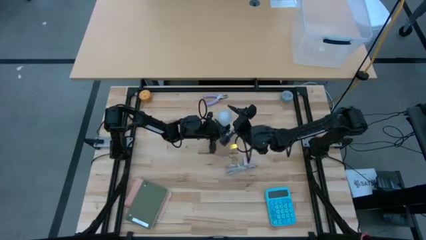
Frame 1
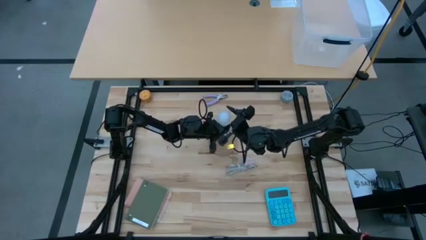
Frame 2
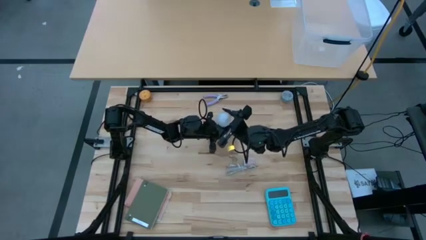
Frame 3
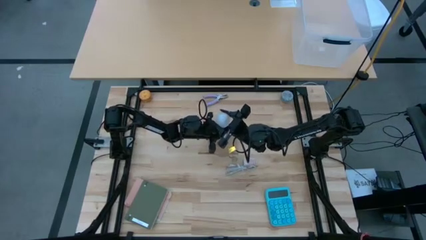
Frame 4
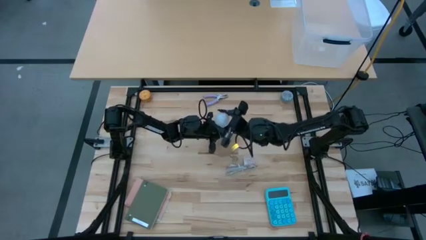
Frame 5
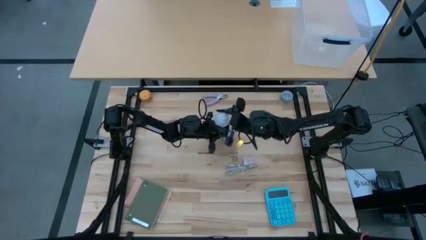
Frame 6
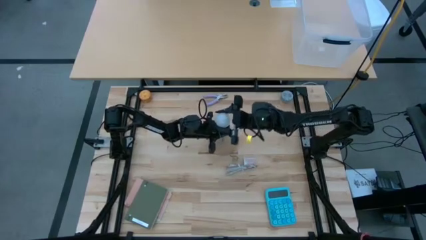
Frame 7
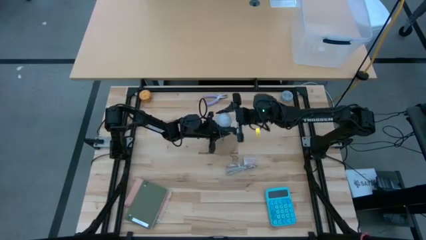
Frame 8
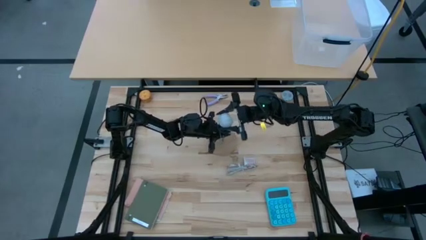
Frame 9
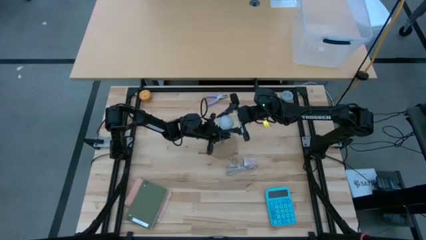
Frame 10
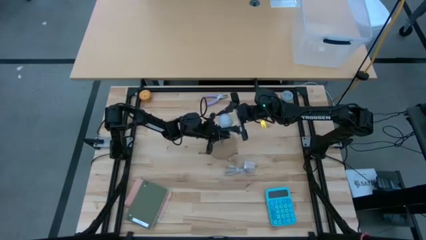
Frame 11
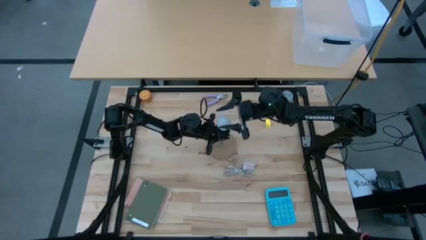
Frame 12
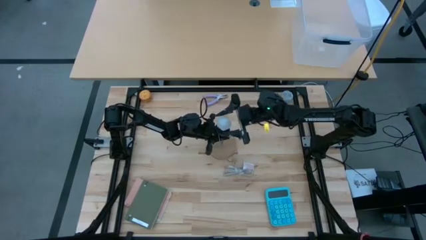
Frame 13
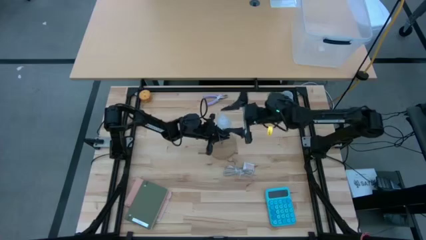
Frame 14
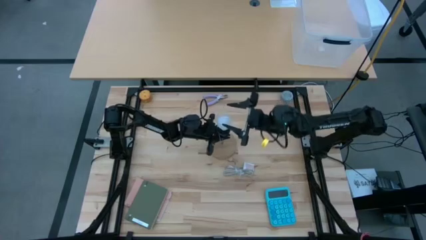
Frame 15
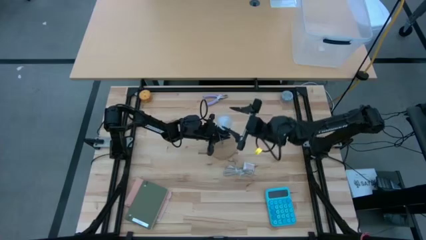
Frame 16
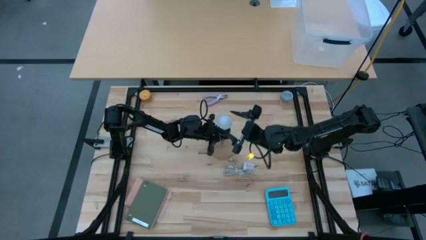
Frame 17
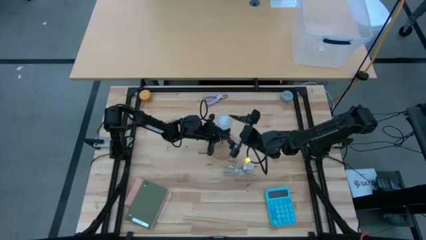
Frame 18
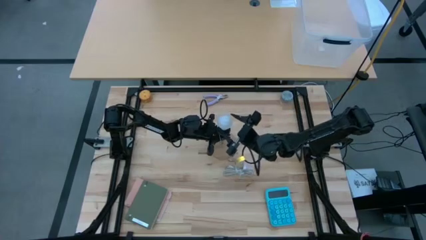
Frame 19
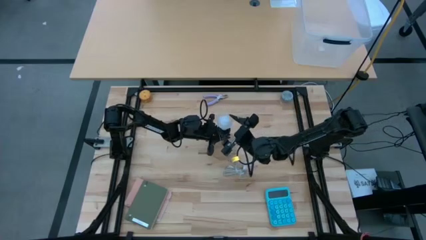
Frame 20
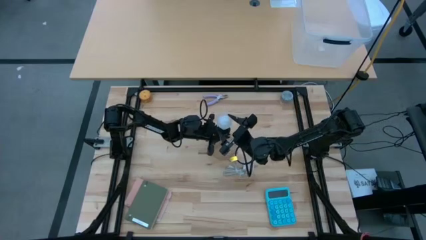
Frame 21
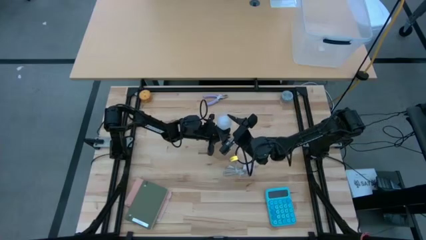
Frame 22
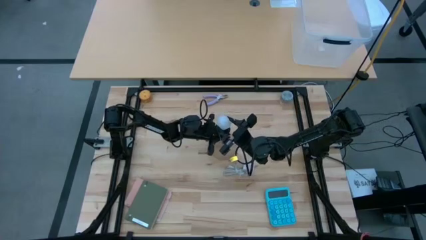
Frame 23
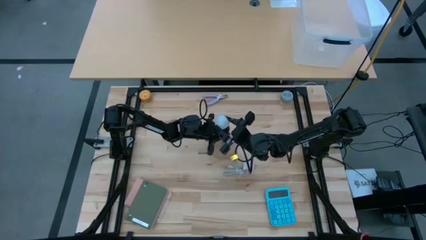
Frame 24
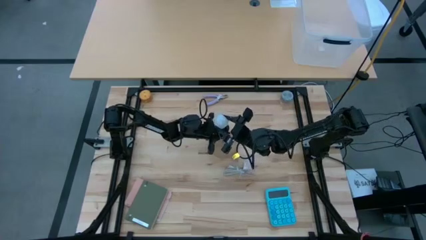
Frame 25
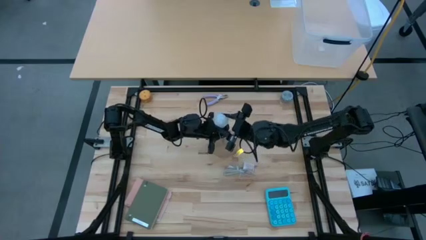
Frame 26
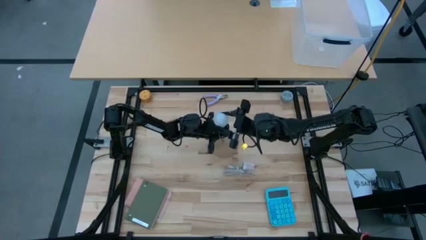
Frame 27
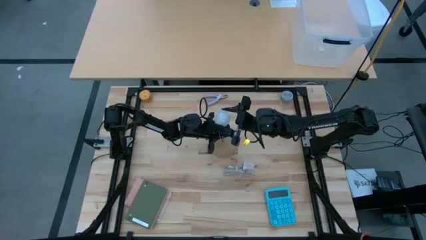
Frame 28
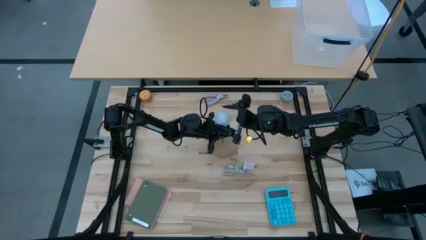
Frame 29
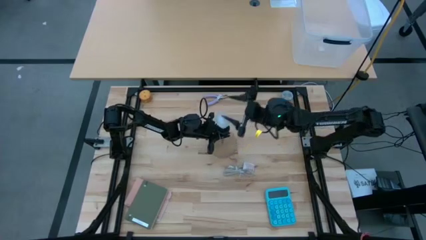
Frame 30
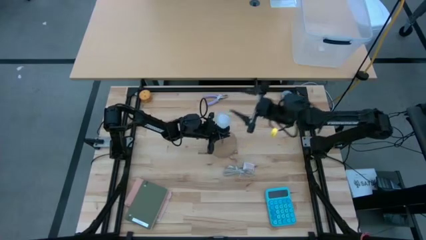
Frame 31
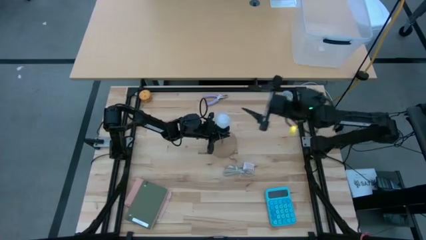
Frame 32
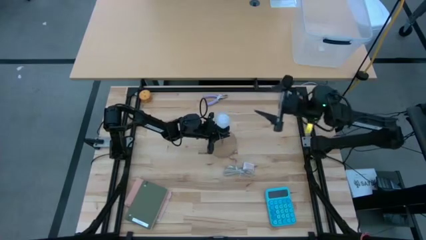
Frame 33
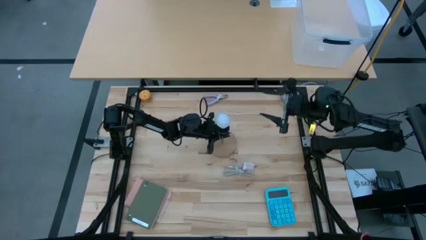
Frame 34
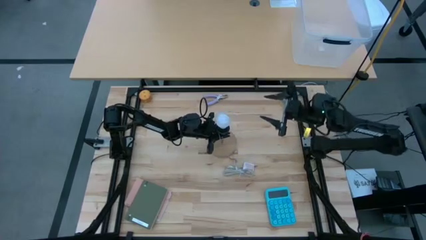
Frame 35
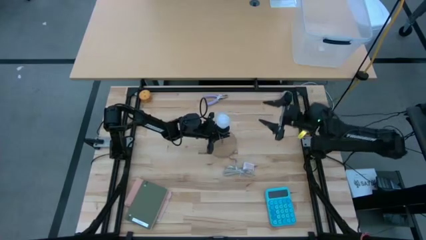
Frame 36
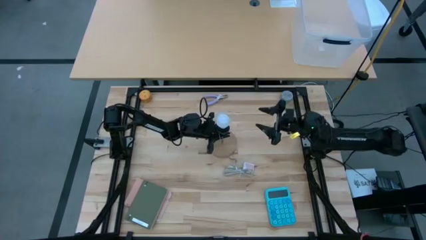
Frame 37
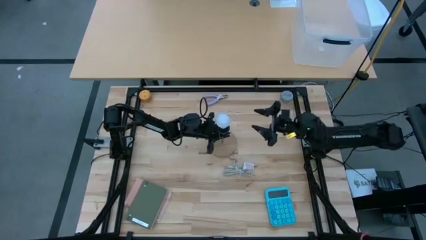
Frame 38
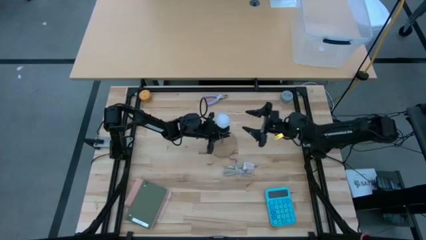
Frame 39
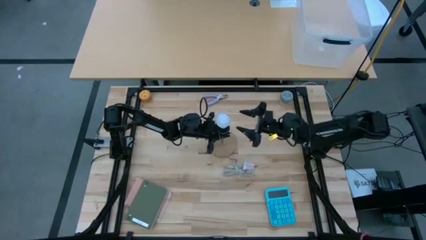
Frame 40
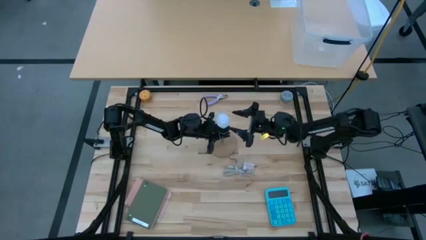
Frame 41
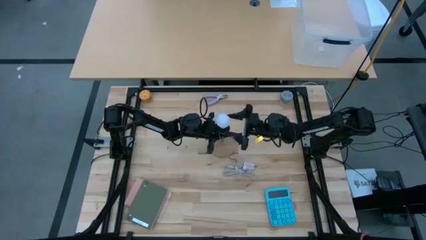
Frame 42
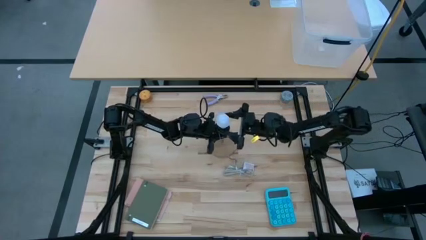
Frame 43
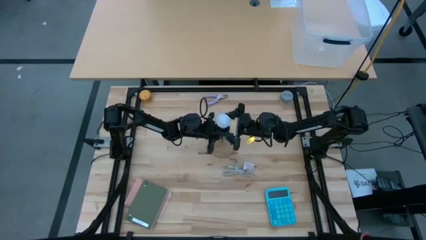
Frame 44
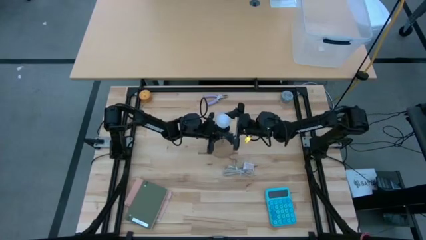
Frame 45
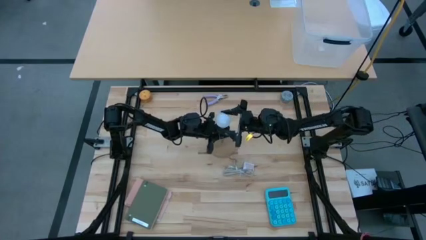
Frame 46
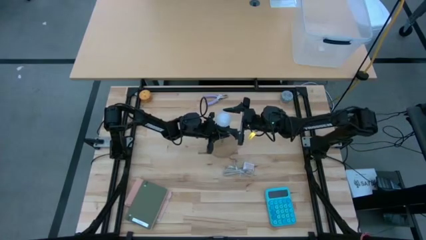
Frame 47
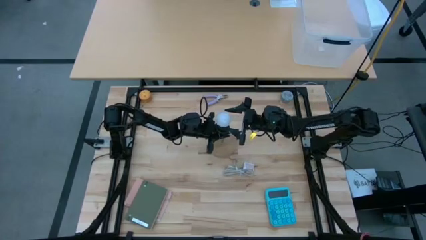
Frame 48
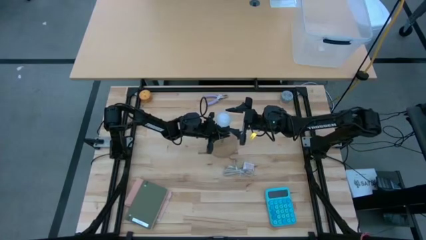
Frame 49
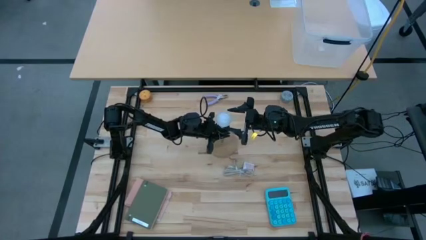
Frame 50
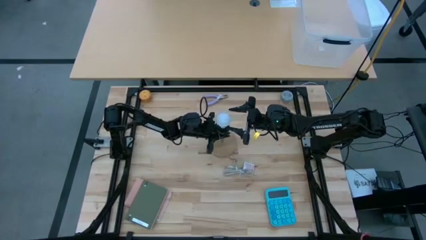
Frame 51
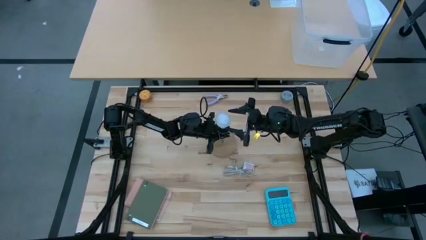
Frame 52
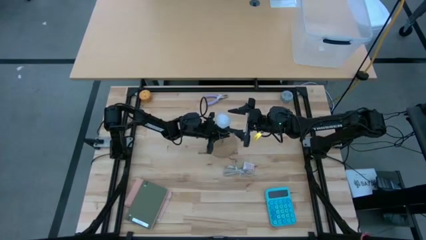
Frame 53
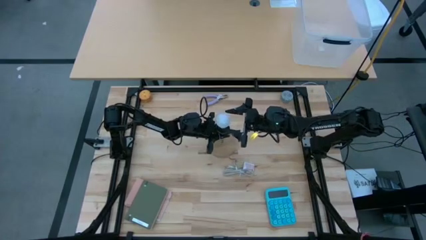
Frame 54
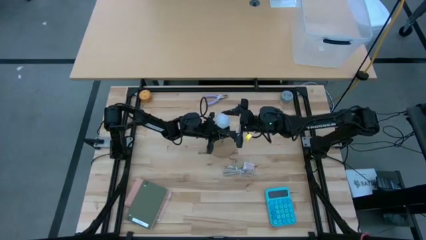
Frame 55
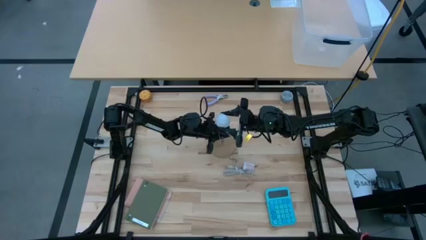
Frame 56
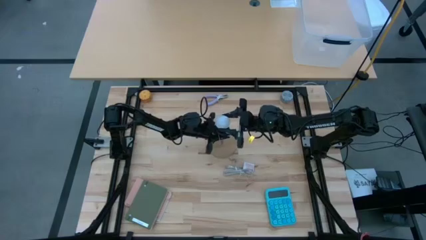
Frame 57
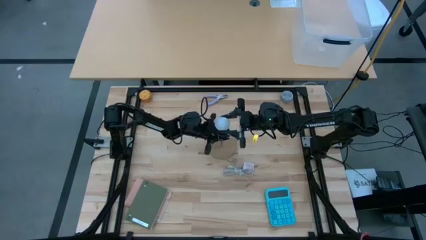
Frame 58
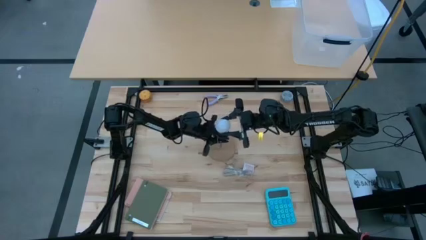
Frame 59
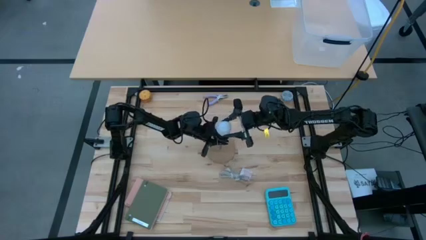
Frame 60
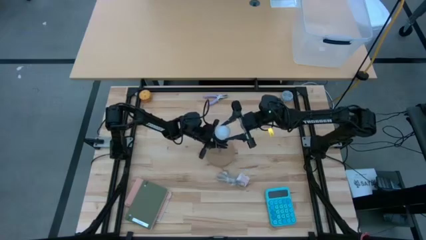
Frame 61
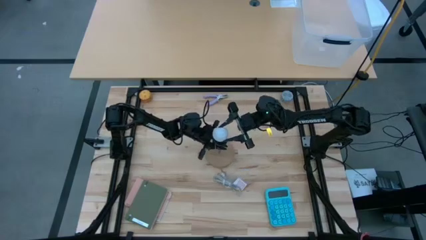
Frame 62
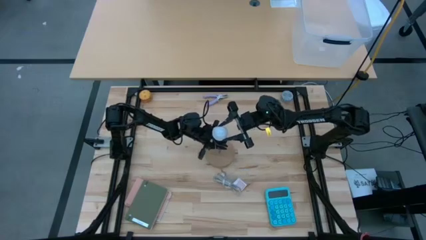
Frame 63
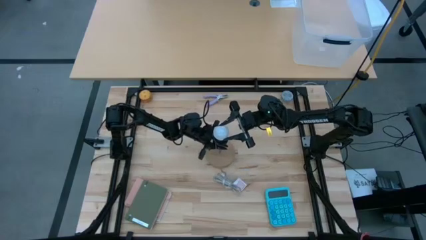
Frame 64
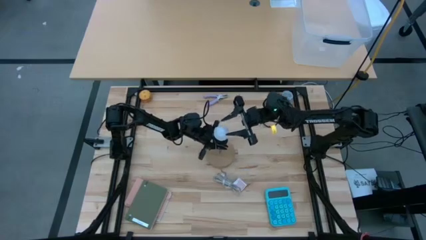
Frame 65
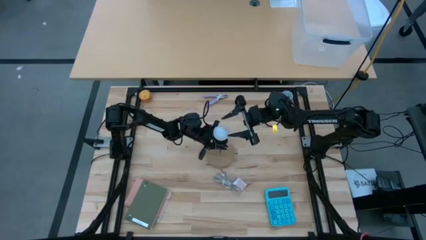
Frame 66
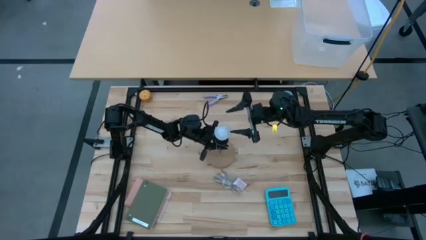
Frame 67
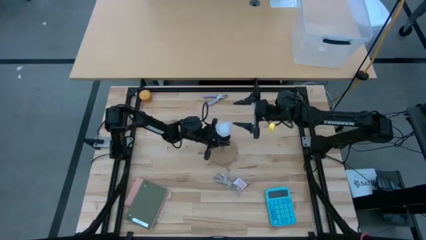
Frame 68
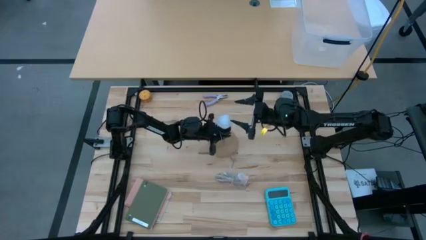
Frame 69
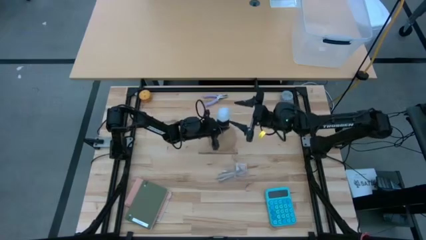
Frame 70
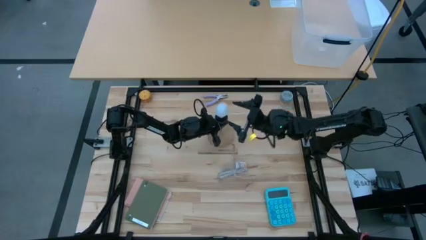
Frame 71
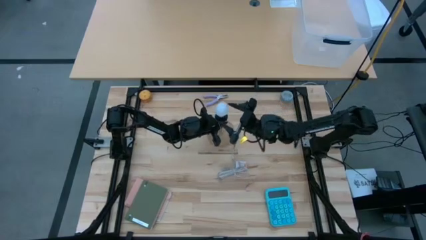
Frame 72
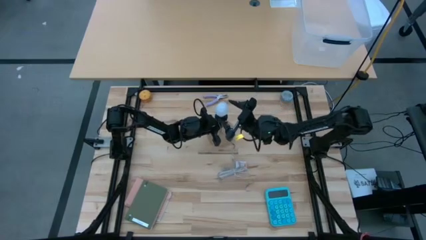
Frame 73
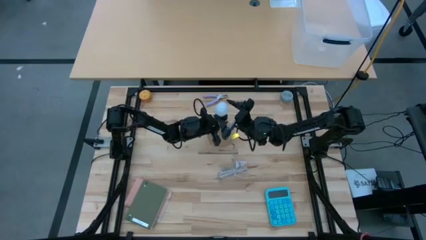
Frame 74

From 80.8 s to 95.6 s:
Task: Screw lightbulb
Remove the light bulb from the brown lamp

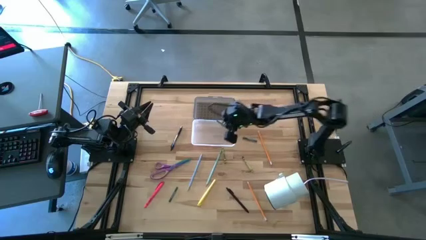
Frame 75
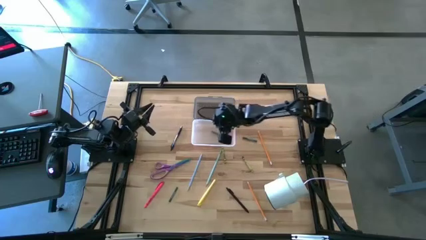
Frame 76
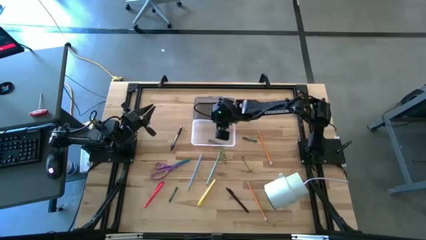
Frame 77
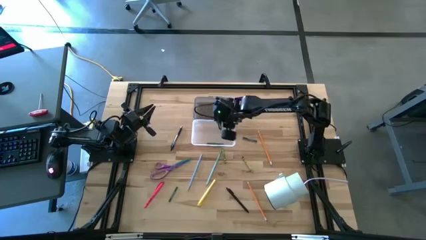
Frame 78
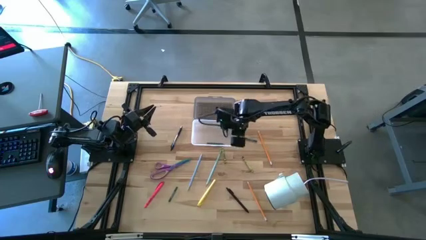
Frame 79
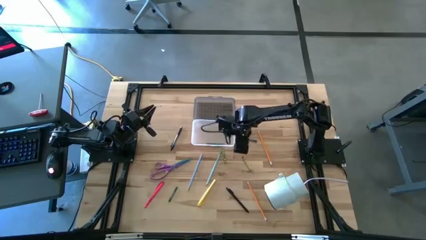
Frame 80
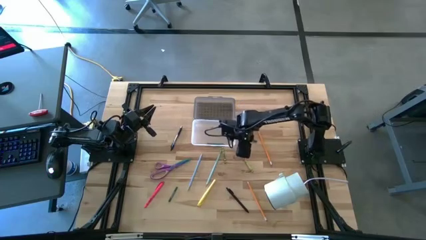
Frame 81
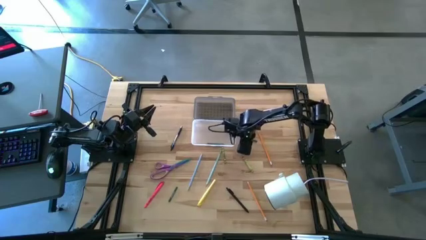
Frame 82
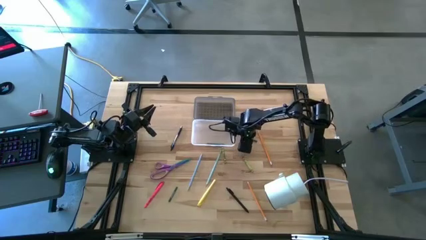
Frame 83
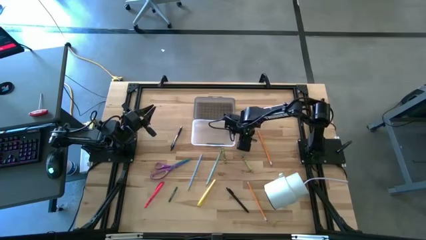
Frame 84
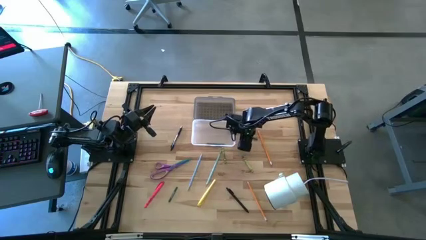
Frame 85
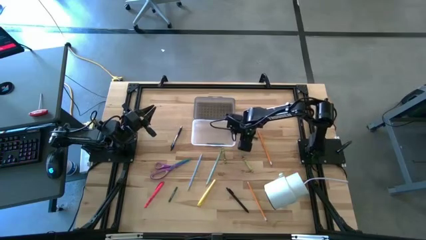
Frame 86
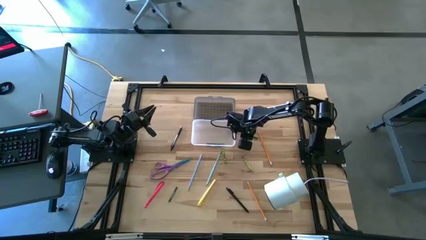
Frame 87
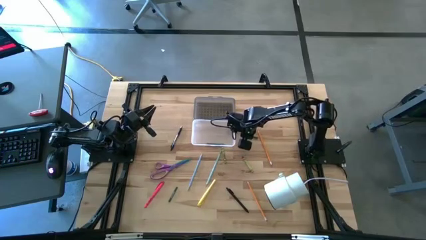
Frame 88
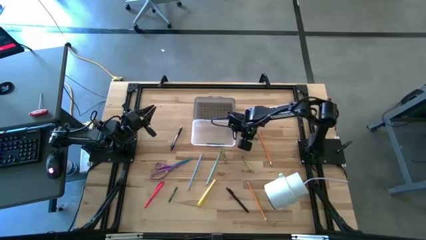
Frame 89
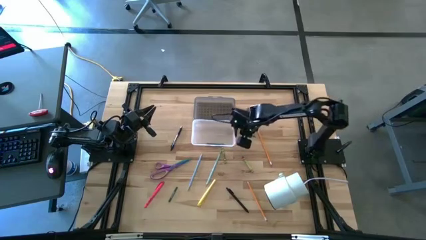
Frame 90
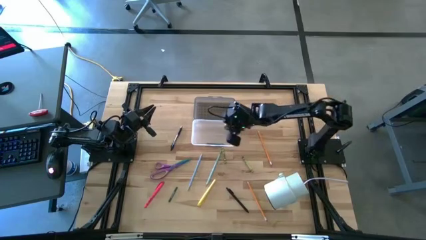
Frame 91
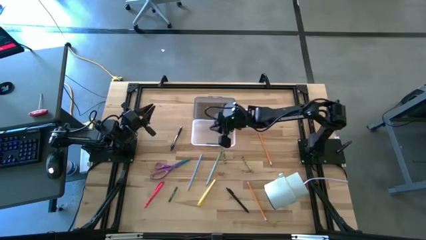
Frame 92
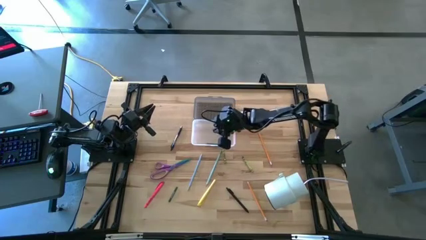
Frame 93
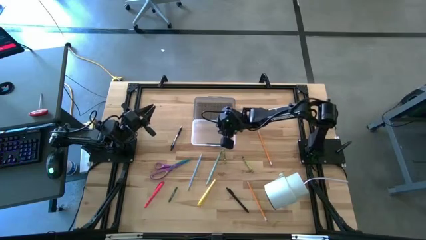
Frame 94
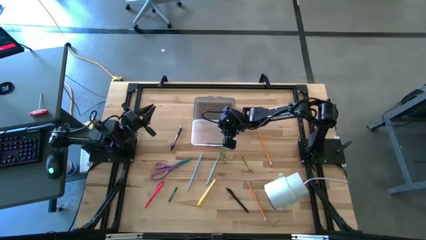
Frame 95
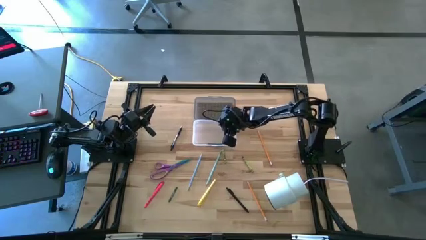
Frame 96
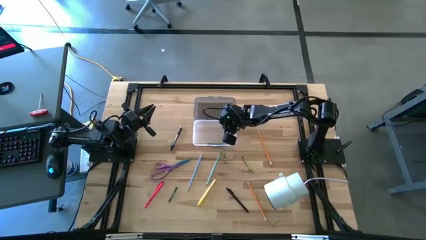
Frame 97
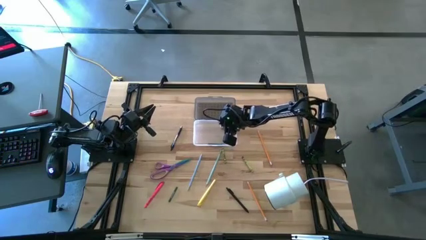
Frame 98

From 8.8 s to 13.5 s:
Task: Pick & place school supplies into a supply box
Put the top dark green crayon into the black supply box
